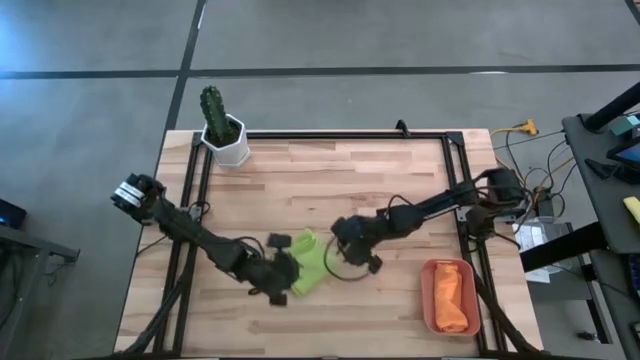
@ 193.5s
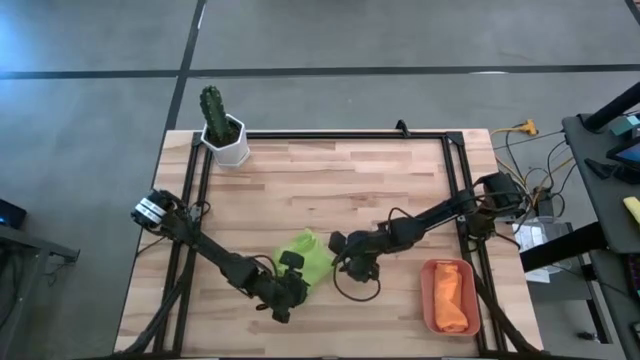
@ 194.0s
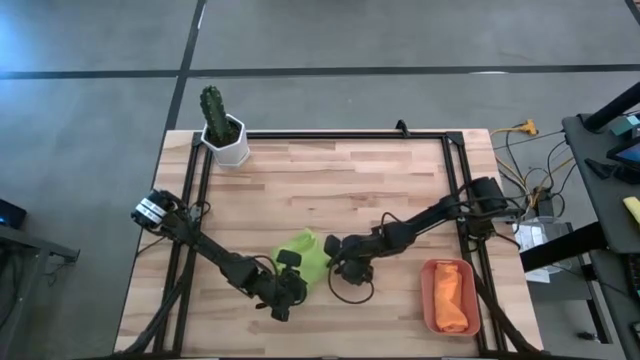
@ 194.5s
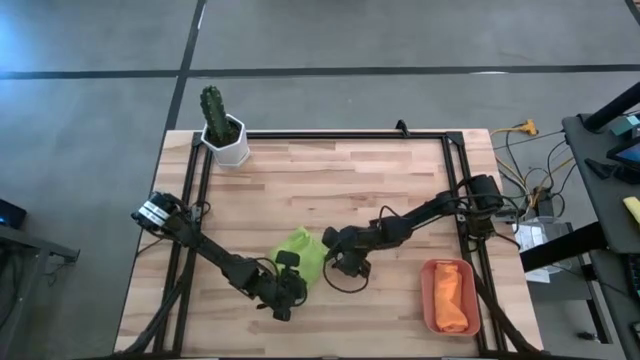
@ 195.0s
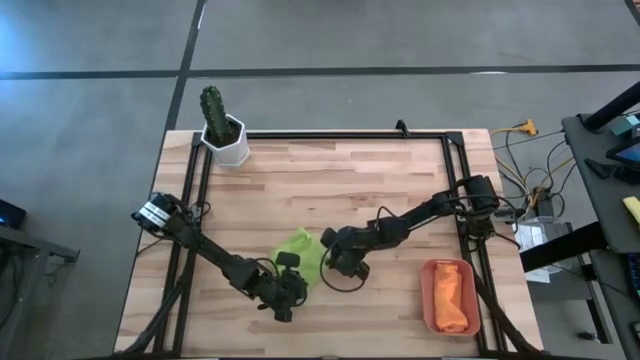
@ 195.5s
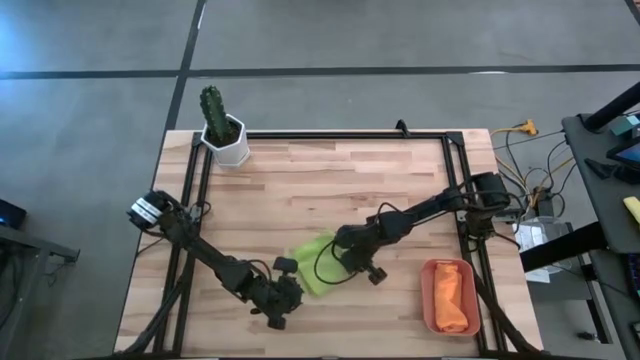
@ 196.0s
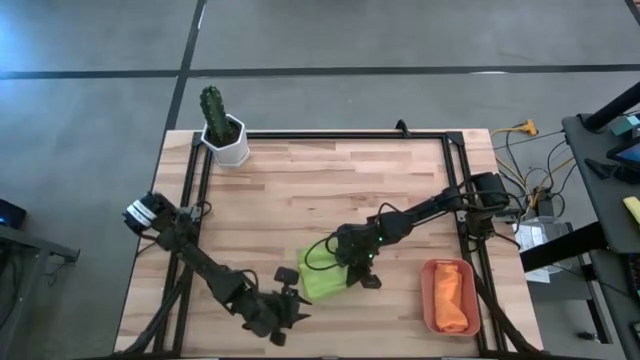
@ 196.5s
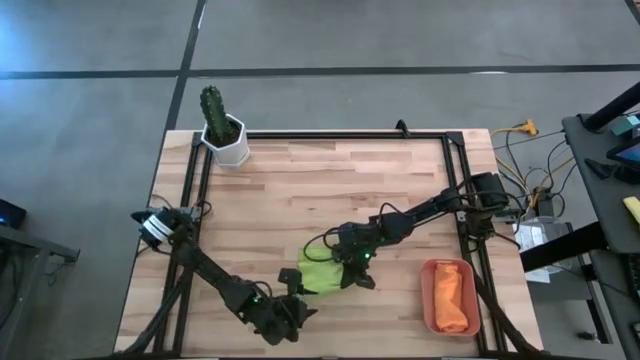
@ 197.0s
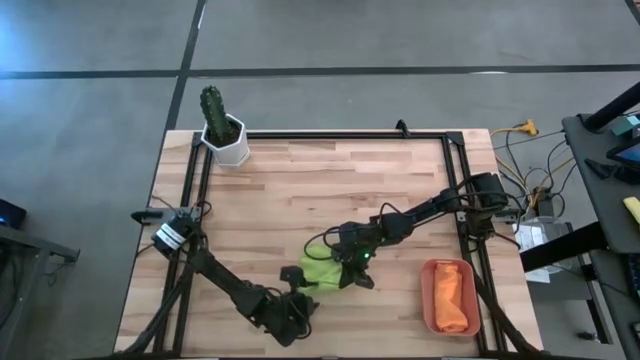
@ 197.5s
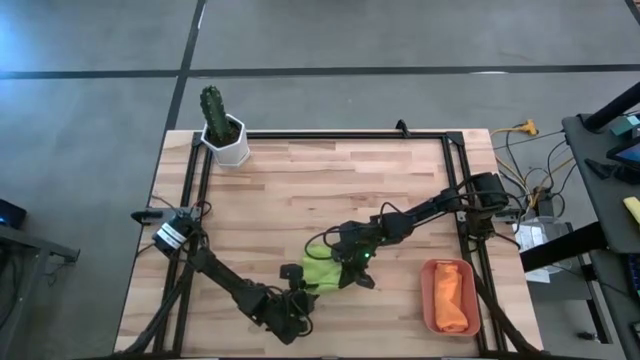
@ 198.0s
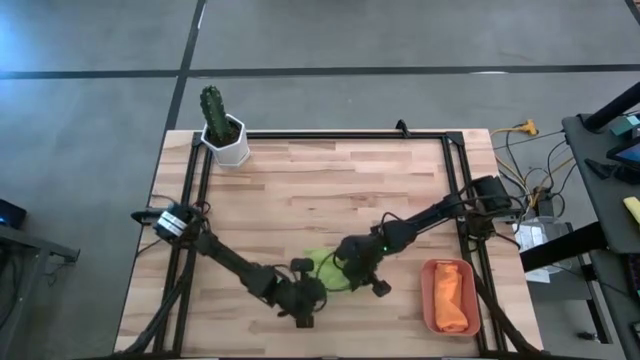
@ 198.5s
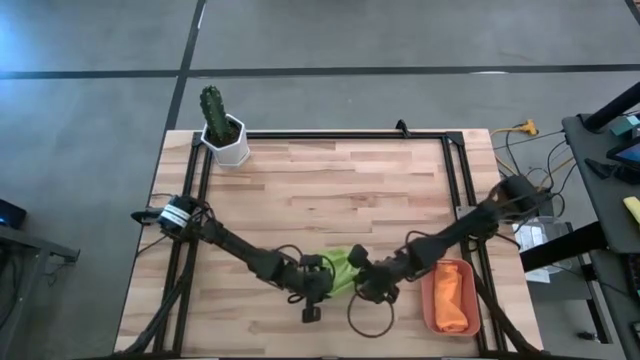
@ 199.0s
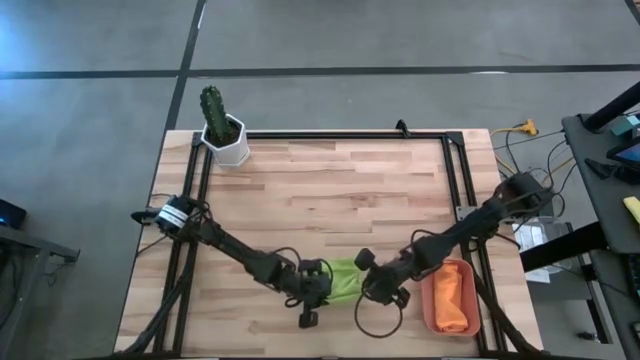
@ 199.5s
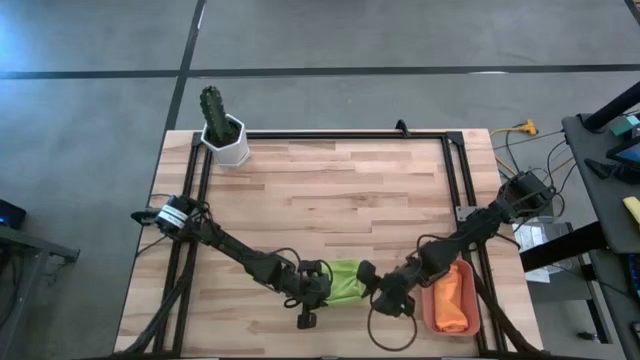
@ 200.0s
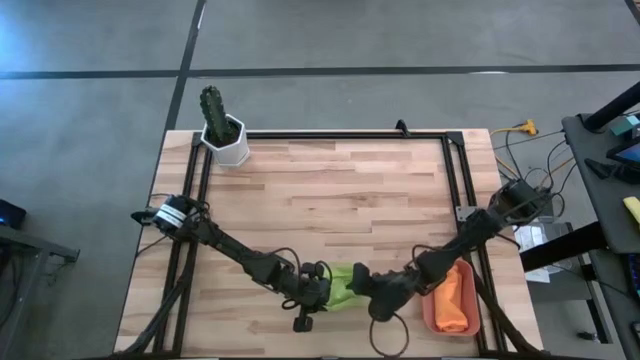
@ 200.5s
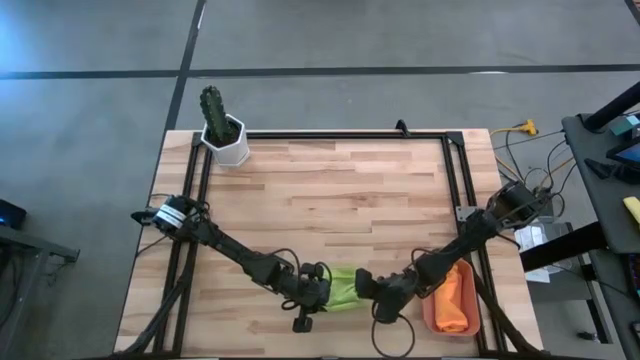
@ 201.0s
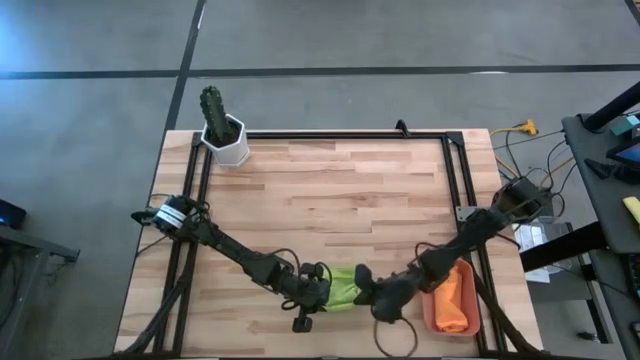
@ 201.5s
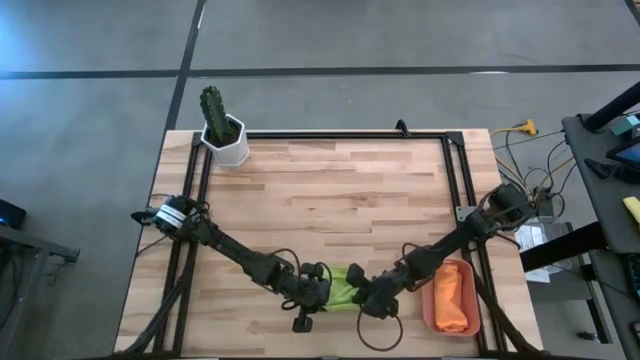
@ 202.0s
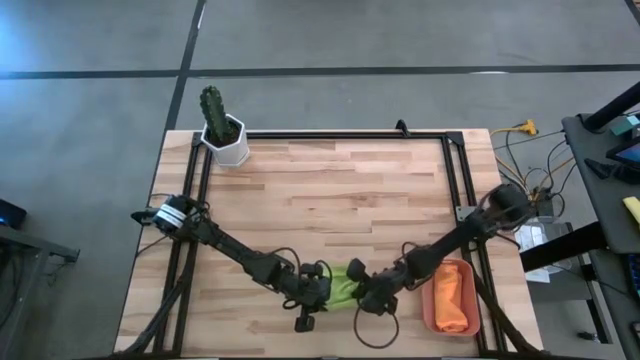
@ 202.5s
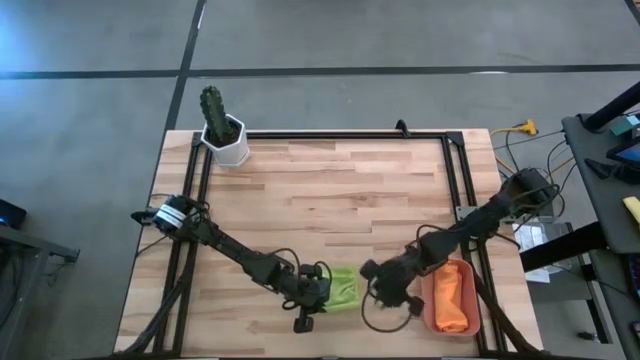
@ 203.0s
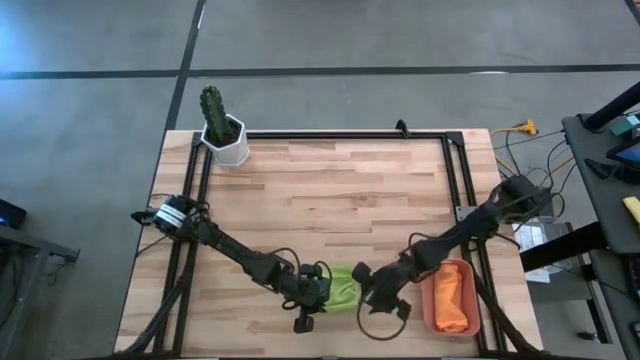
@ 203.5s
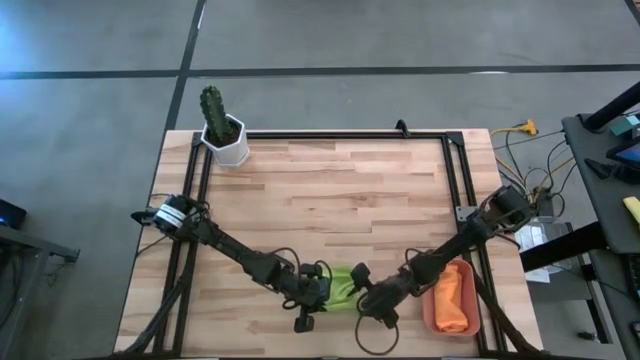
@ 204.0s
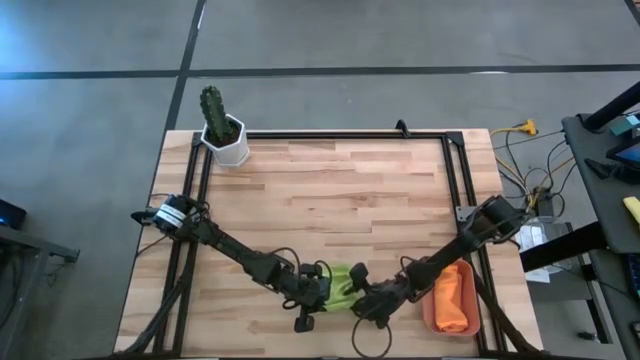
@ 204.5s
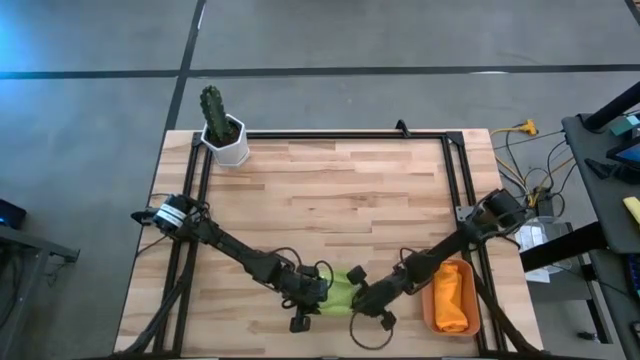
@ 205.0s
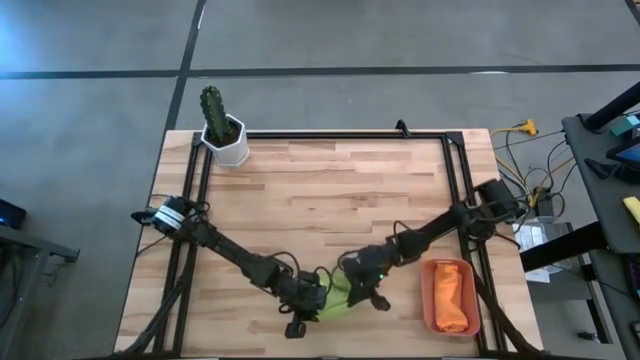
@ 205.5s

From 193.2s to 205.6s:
Task: Roll microfiber towels into tight, uniform cylinder then place into a basket
Roll the green microfiber cloth

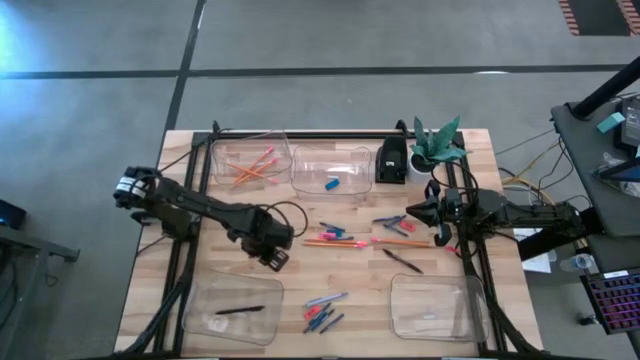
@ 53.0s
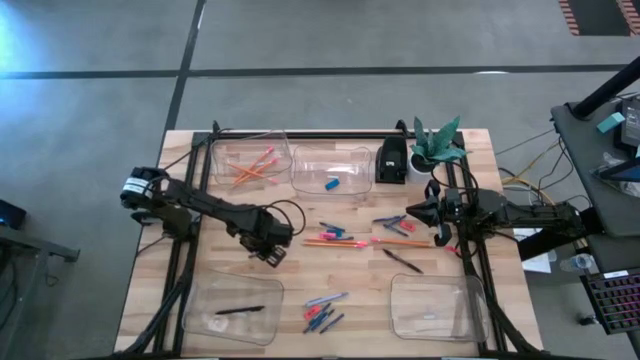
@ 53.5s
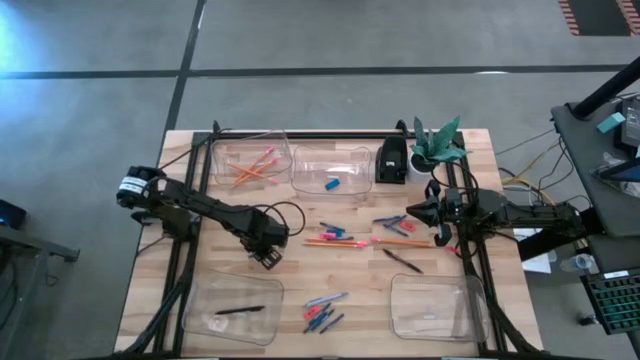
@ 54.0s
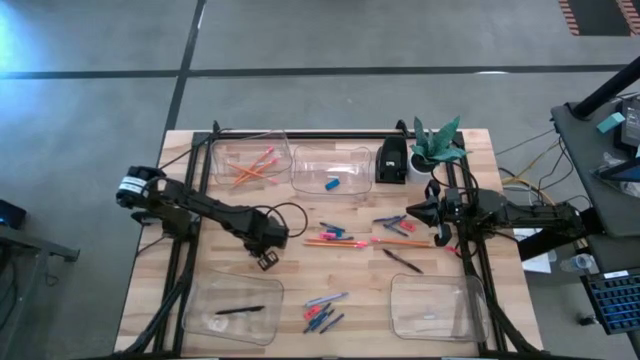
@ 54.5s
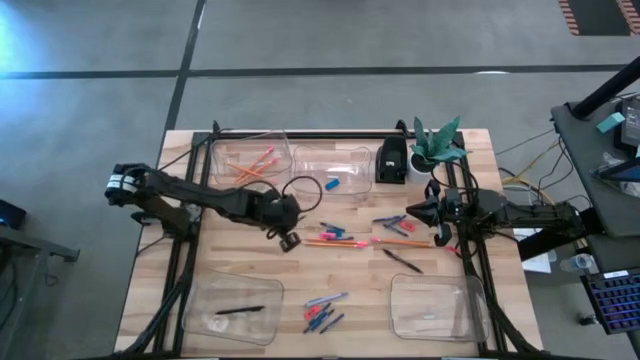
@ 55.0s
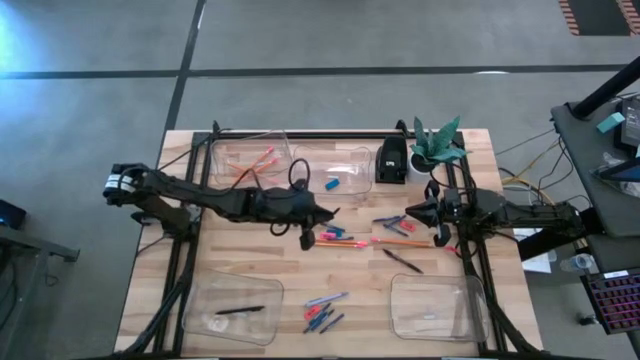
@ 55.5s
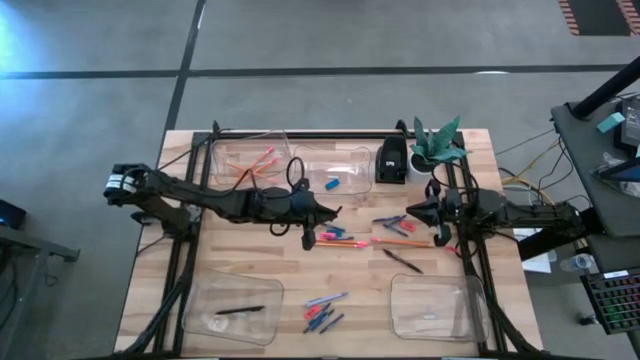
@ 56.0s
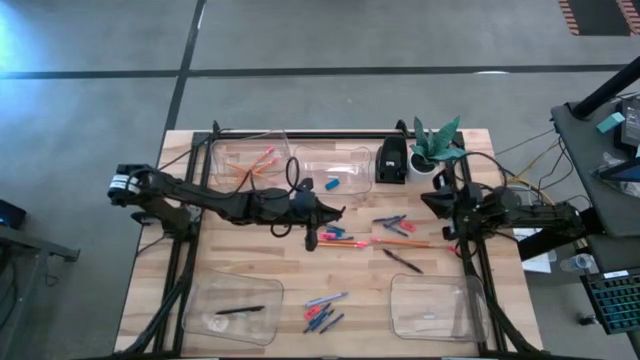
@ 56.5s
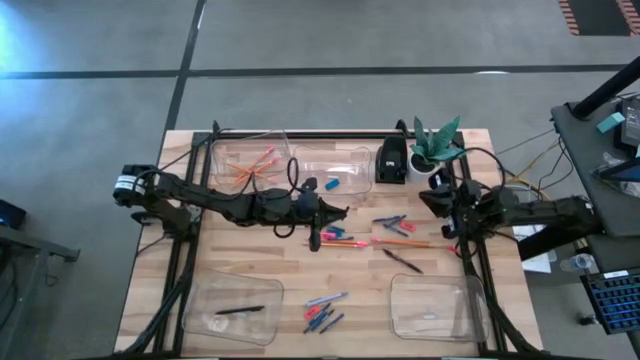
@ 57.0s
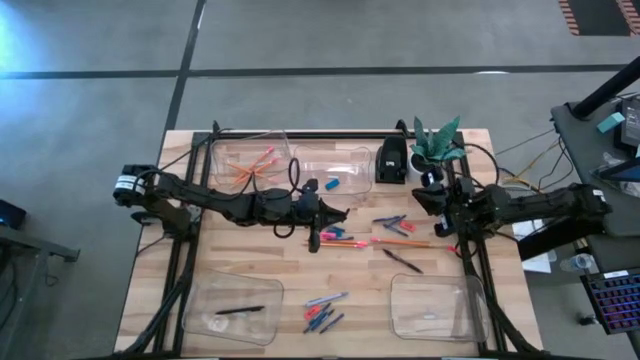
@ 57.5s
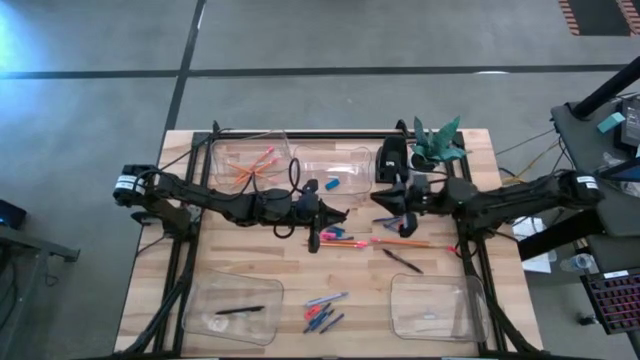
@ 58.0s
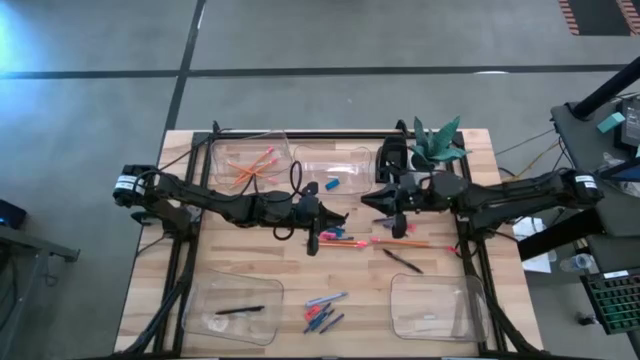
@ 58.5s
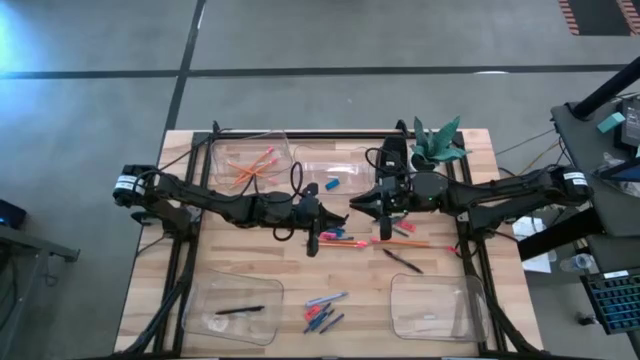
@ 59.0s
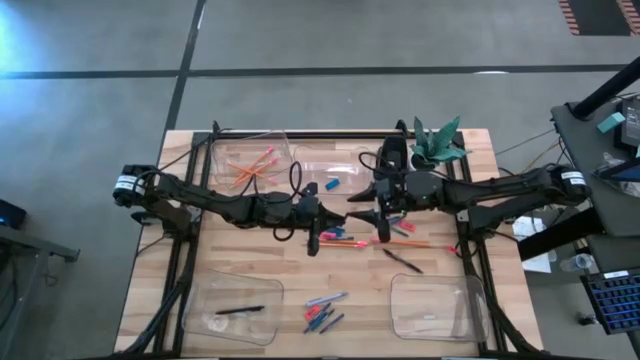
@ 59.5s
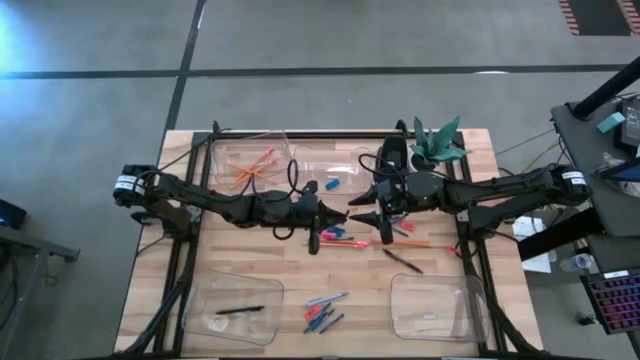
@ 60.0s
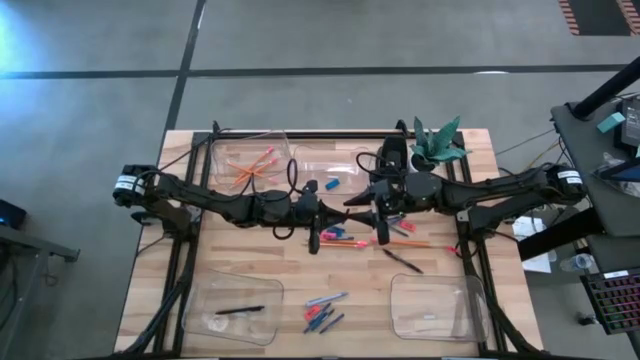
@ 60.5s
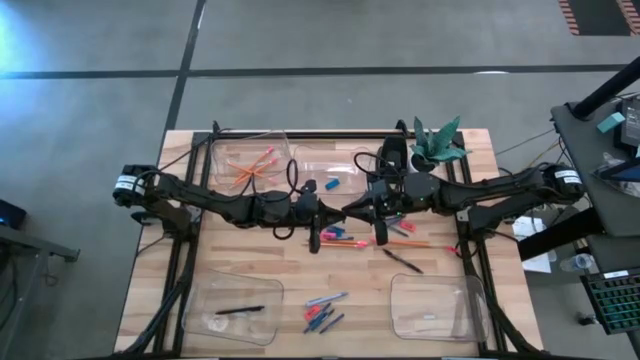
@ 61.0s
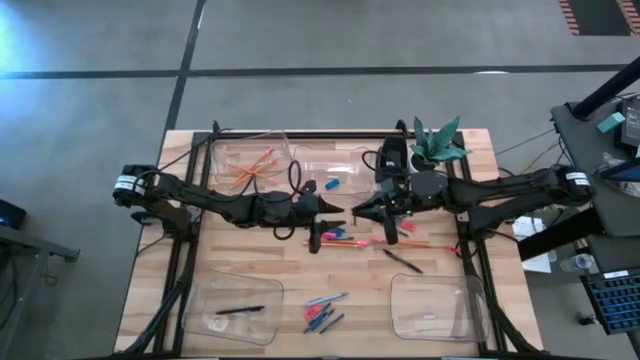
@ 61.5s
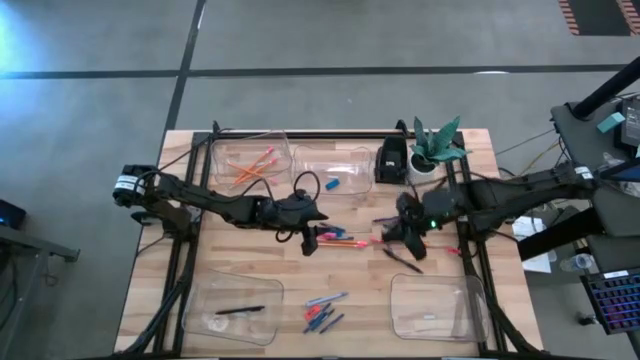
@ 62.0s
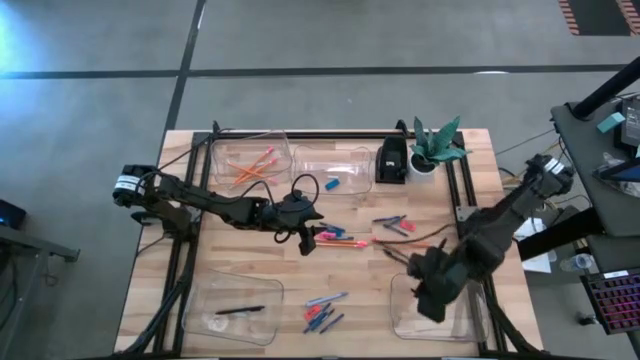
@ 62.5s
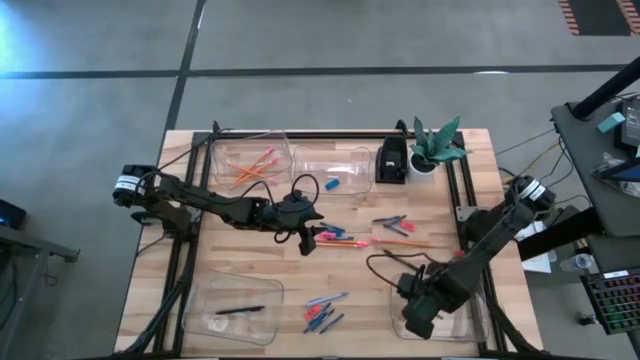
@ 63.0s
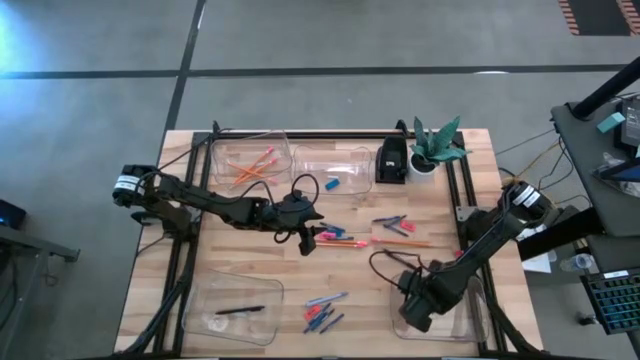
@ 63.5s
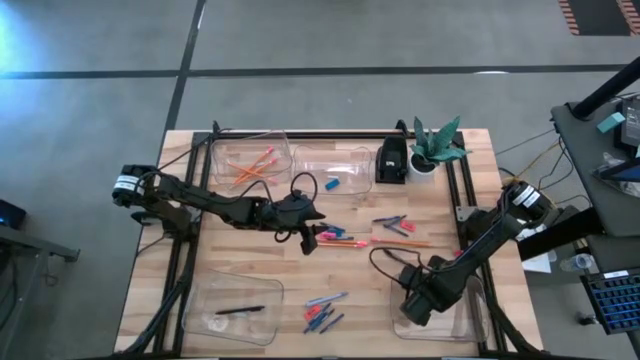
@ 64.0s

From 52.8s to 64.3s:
Task: Sort crayons/erasers/pens/pencils in bins
Put the dark blue crayon into the bottom right transparent bin
